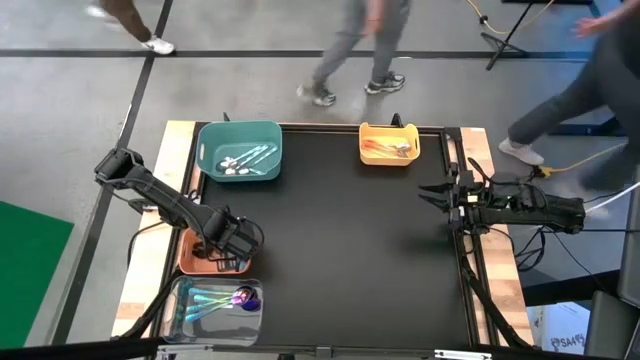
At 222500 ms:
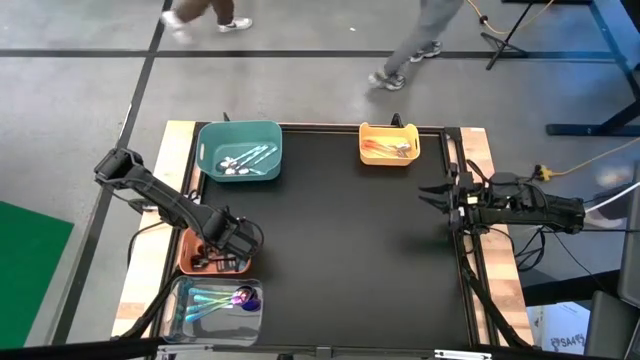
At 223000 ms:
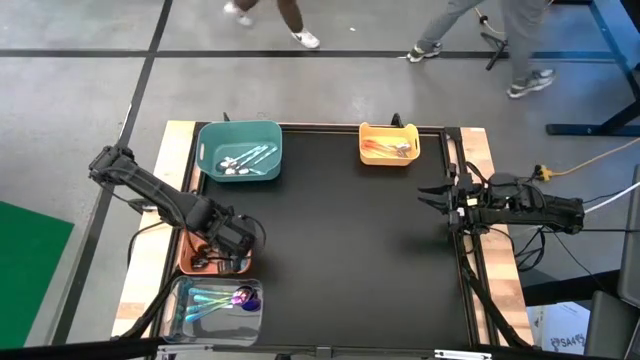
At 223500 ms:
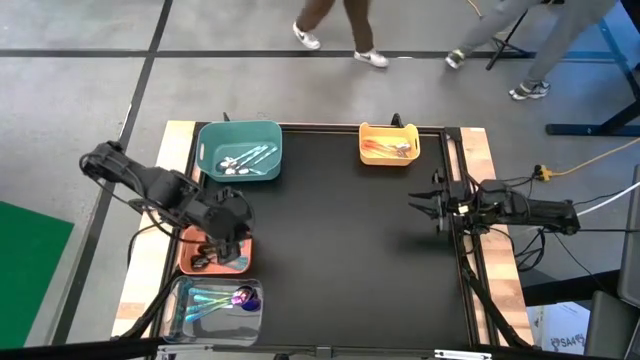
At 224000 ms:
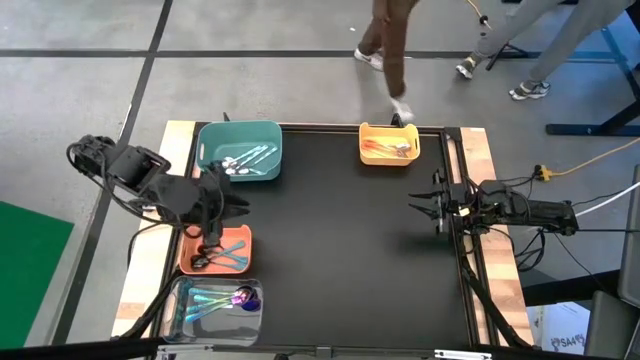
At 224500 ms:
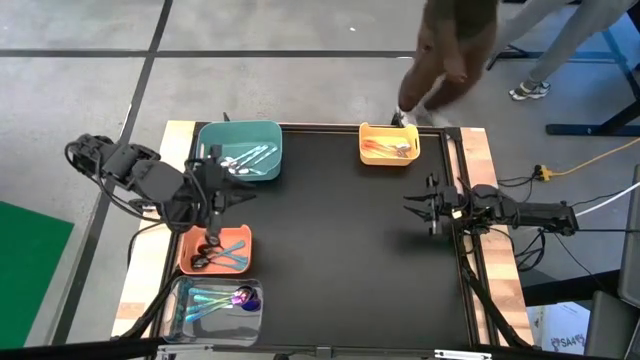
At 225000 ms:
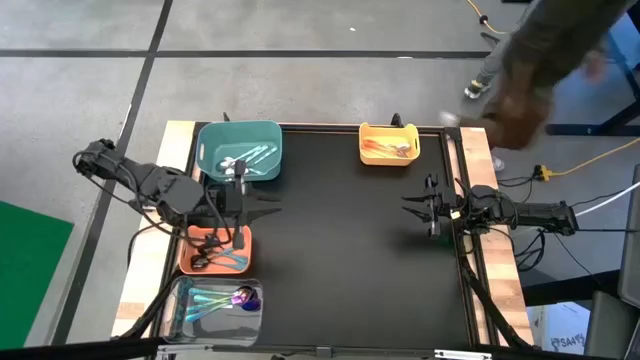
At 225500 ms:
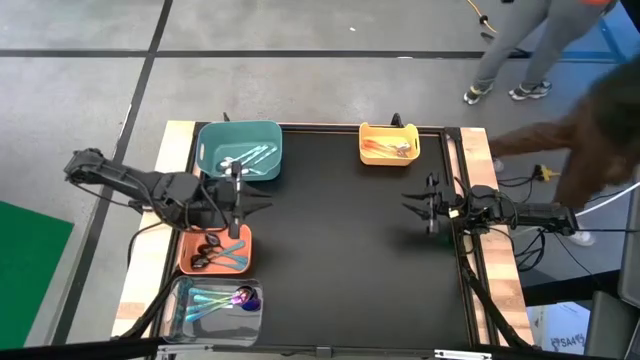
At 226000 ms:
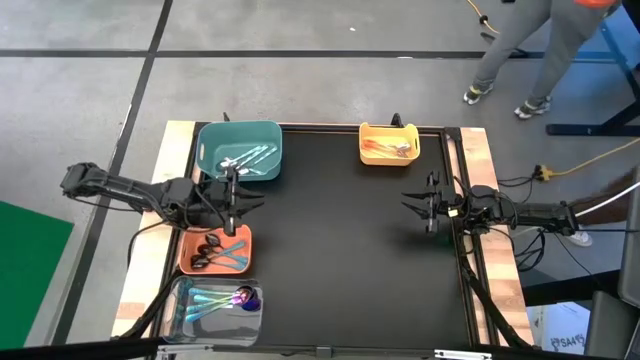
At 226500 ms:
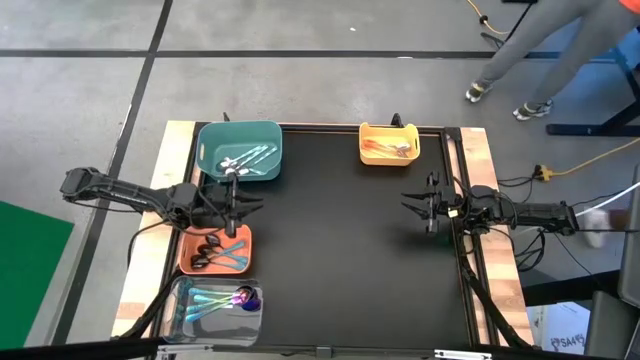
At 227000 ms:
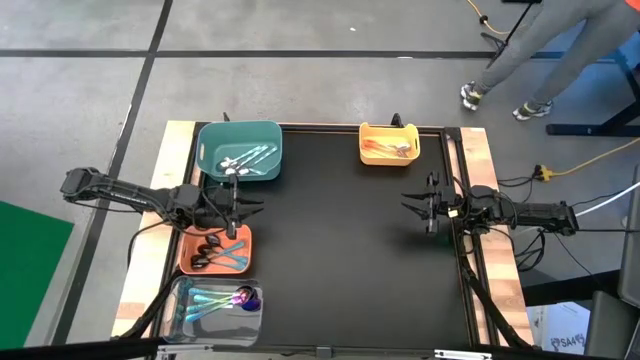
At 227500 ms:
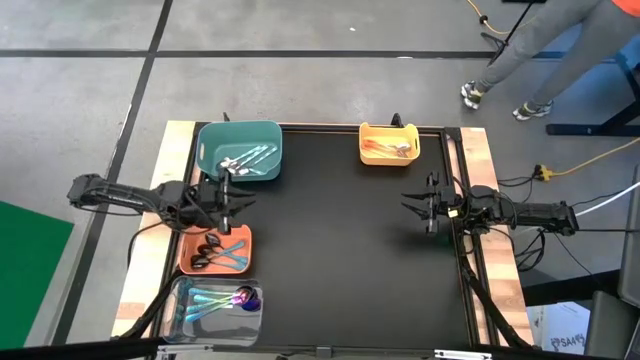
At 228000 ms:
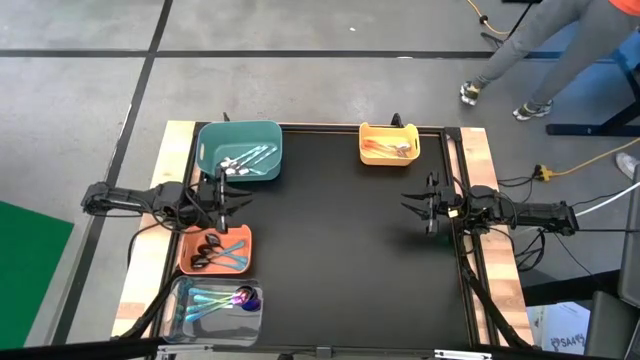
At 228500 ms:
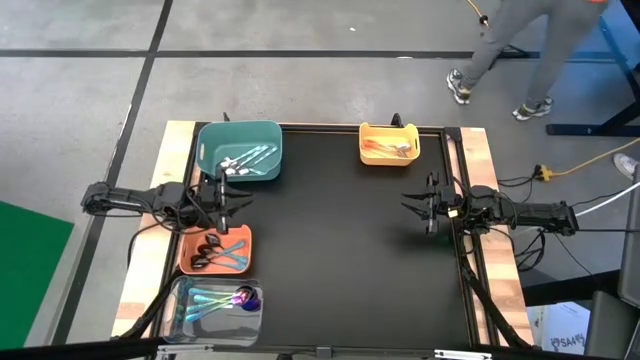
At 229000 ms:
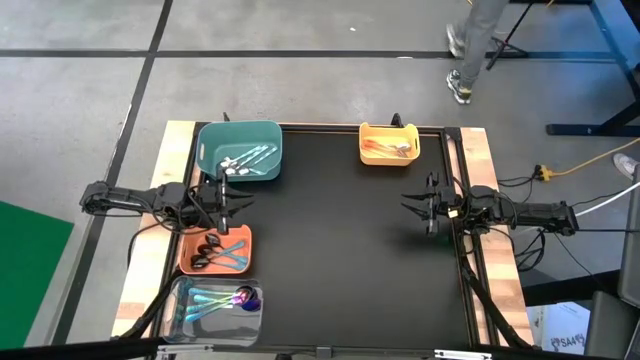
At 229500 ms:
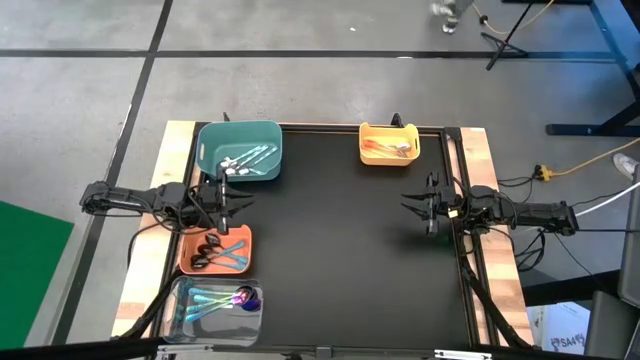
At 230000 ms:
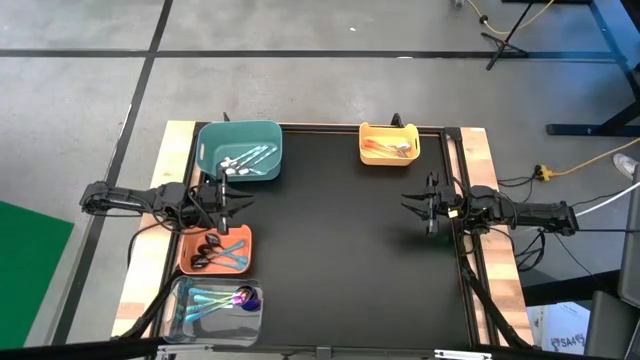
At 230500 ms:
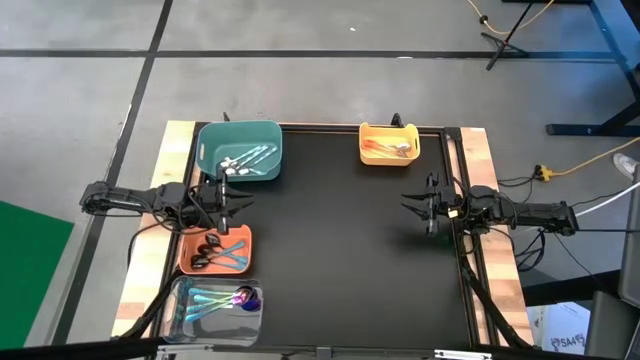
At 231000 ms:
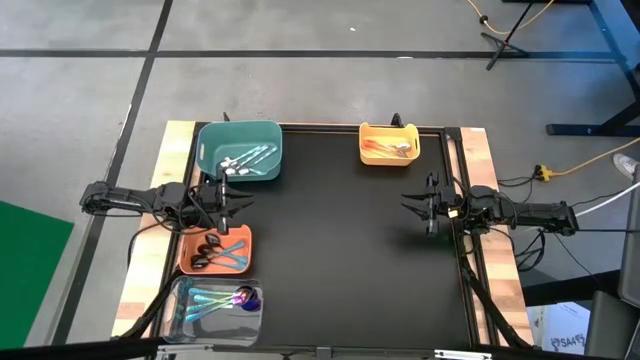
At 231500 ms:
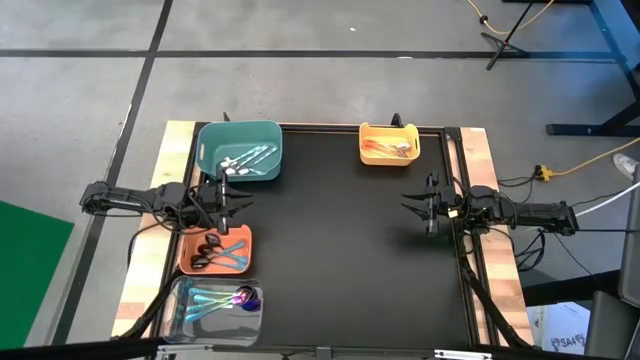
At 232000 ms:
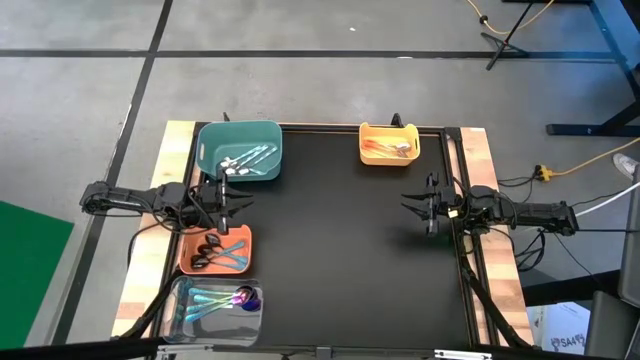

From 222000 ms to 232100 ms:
Task: Sort silverware by color (type)
Return to Home Position

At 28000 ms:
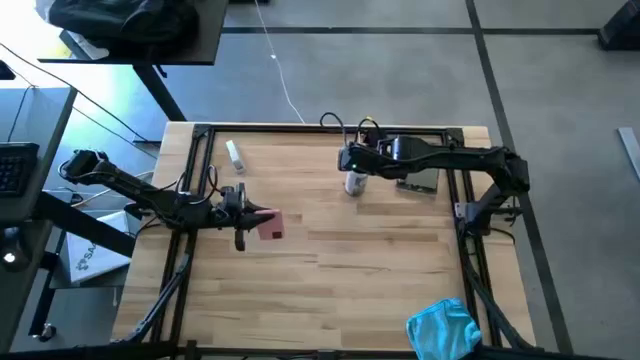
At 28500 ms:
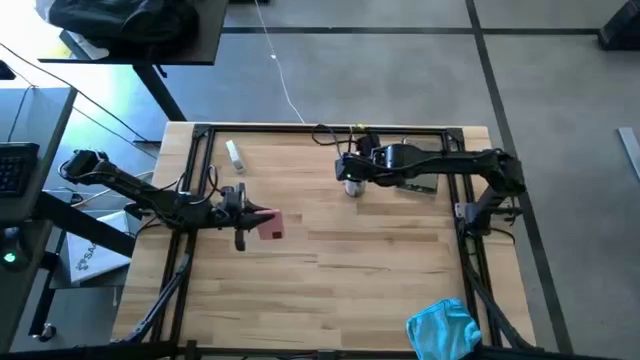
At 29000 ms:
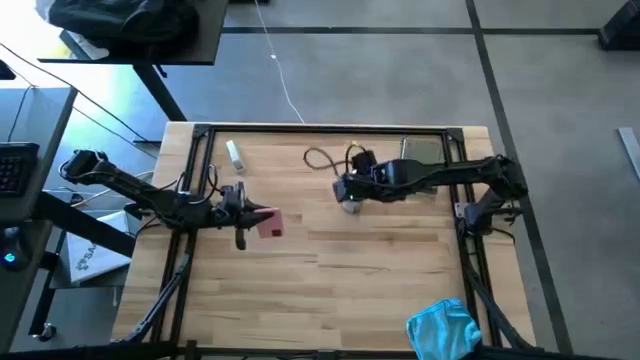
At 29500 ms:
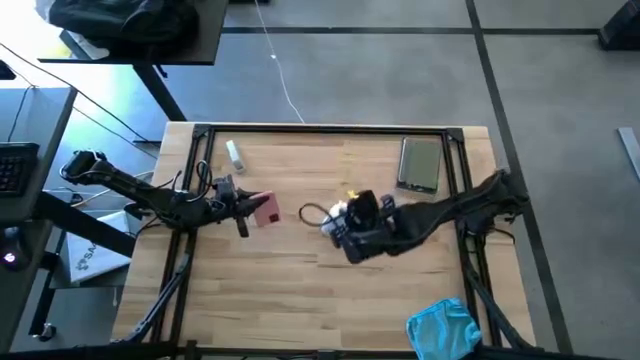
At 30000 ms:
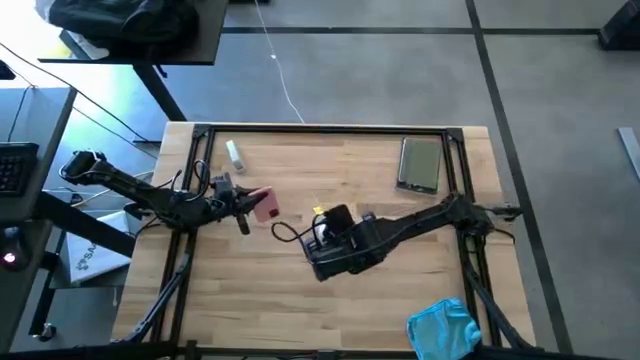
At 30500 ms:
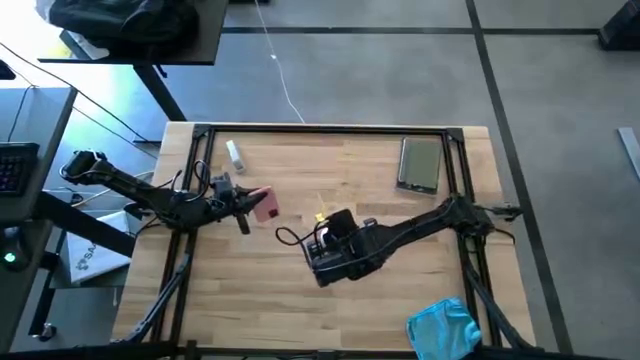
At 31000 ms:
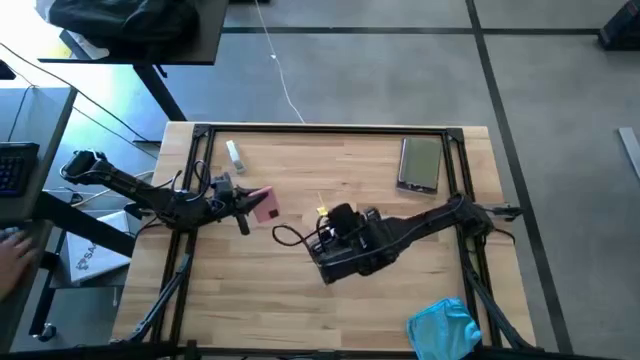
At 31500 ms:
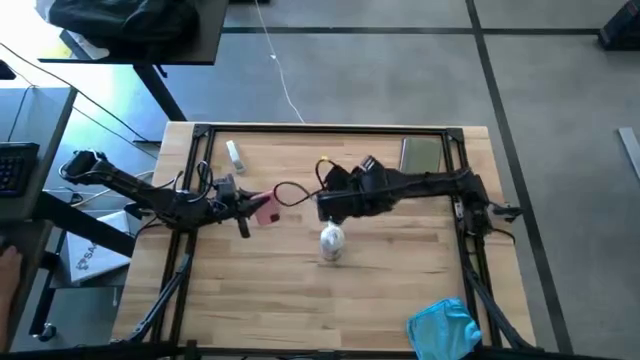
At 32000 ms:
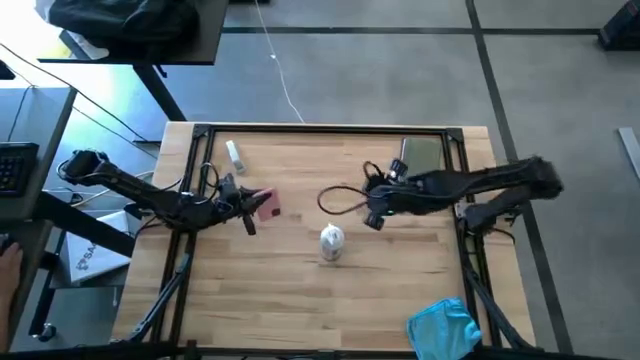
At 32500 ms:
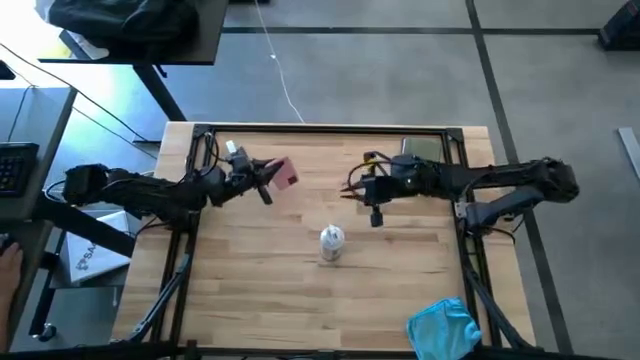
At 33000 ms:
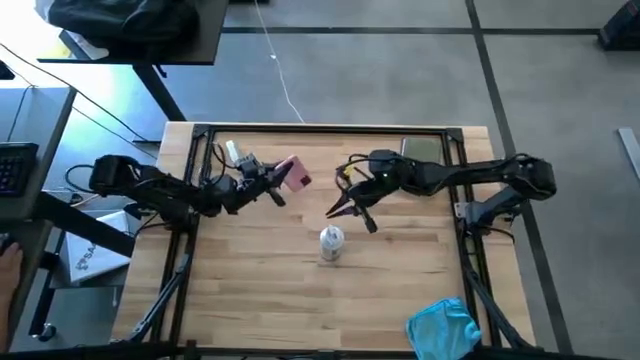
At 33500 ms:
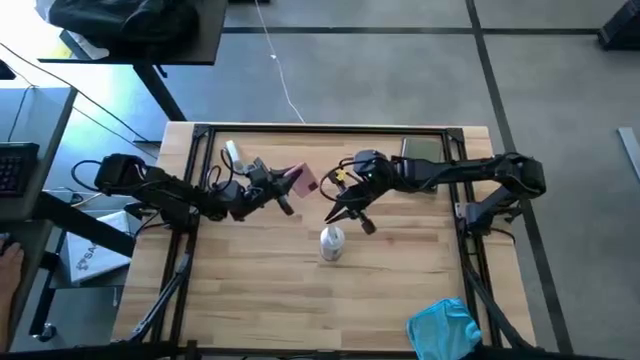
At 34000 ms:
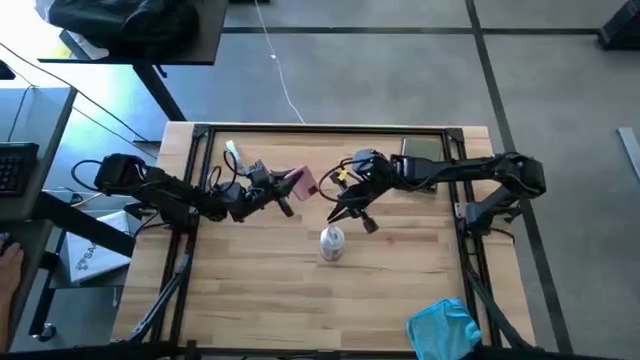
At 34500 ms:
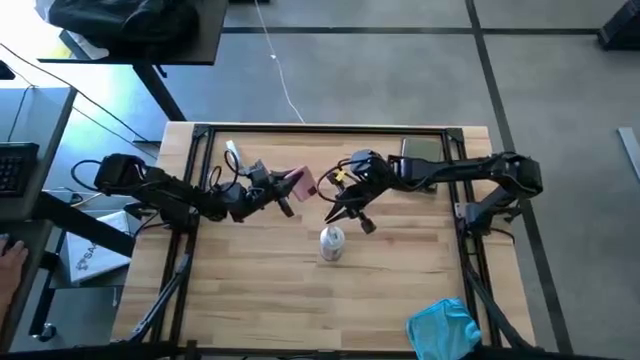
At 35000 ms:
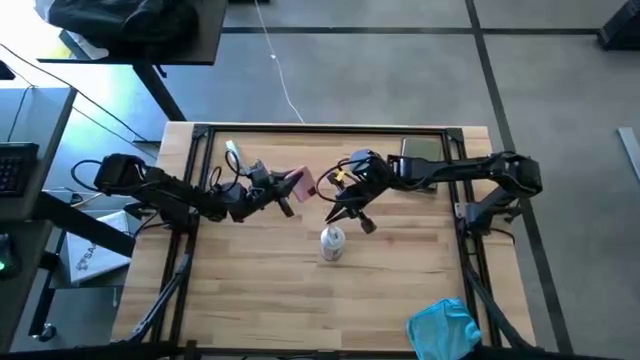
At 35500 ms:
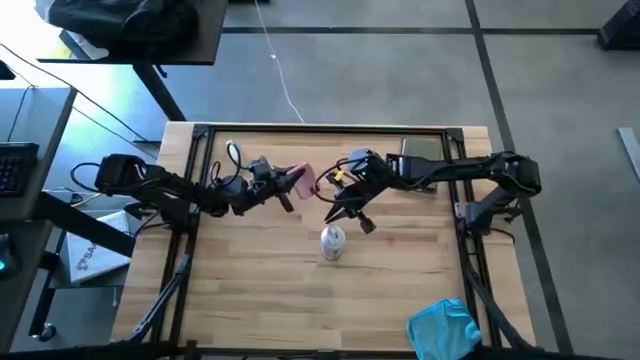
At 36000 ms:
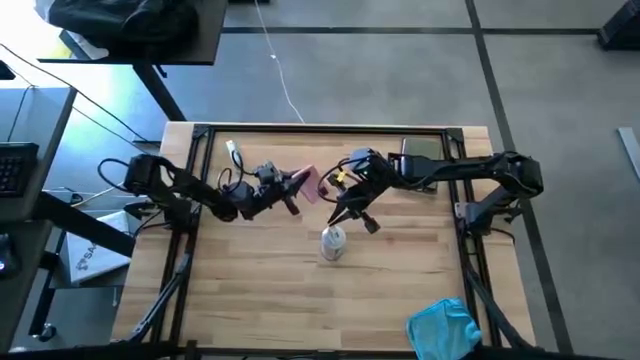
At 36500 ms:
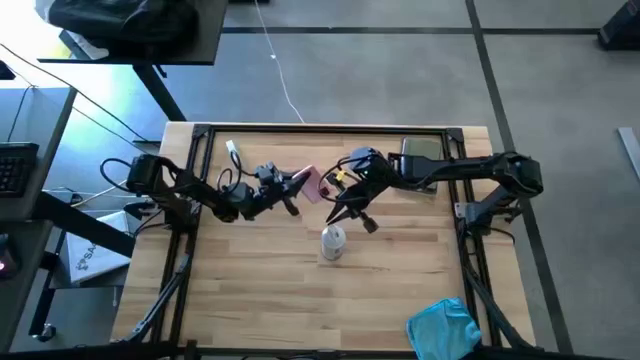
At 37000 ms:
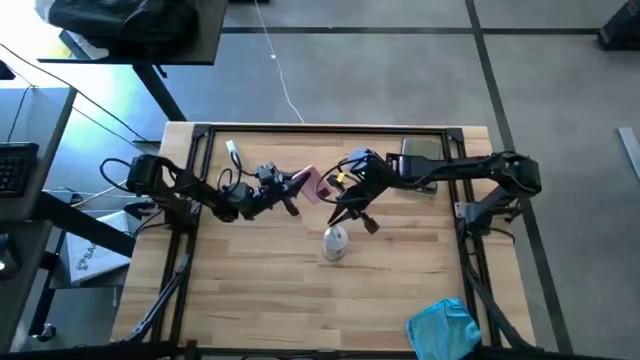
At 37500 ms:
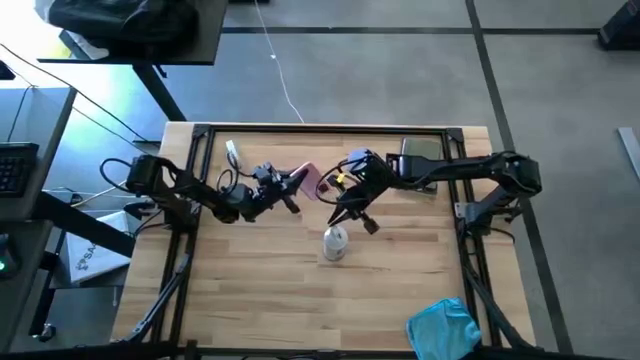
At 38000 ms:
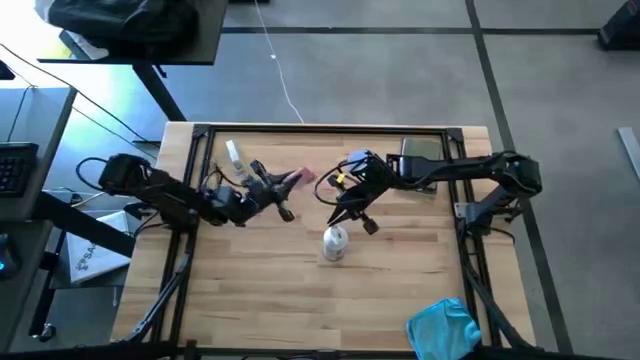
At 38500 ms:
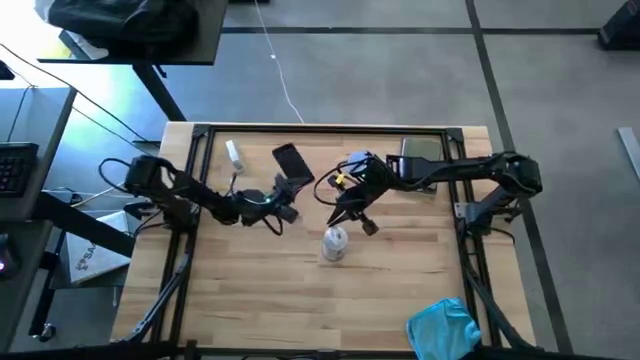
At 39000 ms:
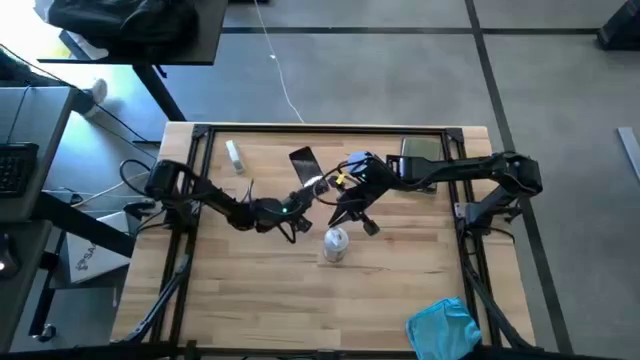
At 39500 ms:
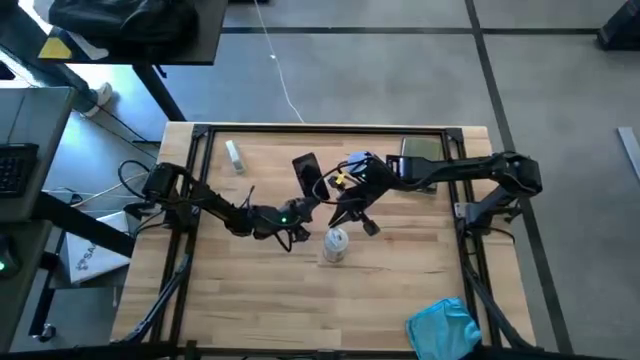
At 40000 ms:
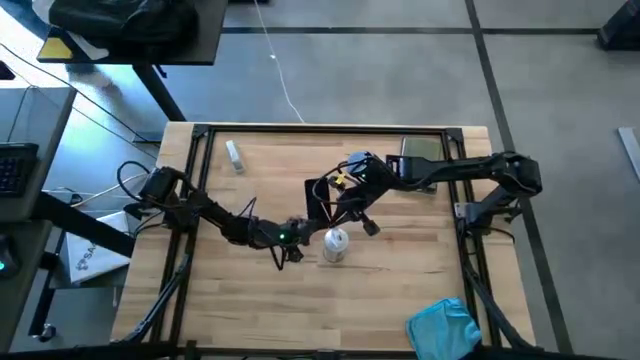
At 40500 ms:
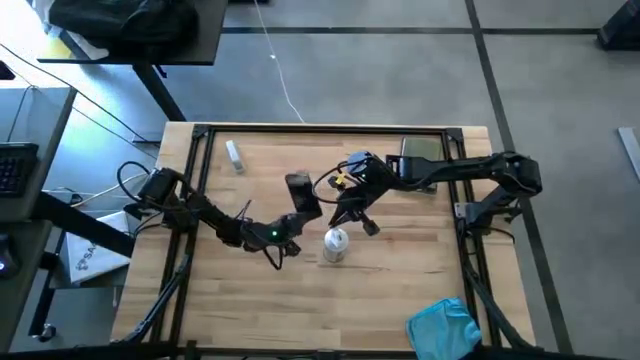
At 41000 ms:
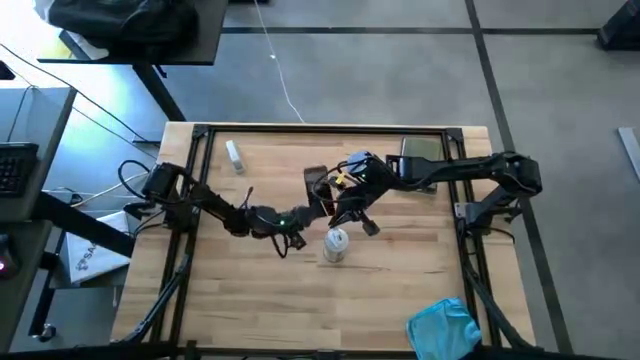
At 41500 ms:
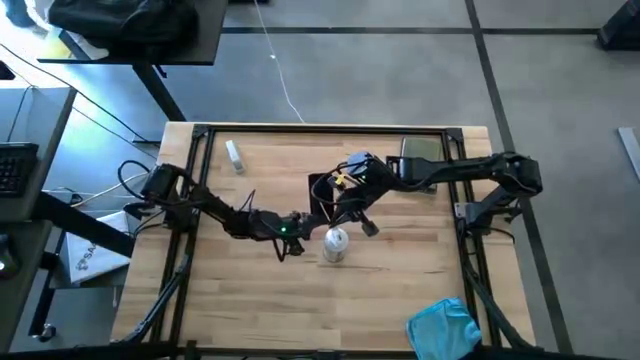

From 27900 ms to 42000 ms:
Task: Apply microfiber cloth
Spray the back and front of the cellphone with the spray cleaning bottle
